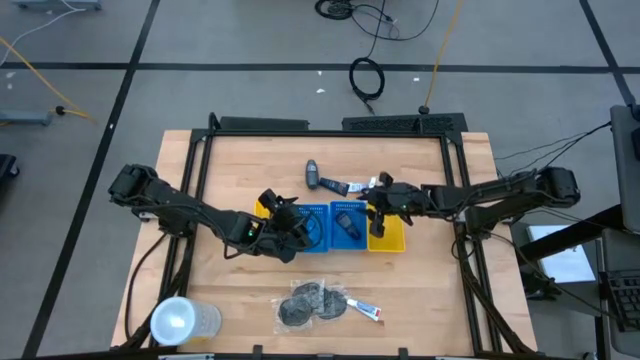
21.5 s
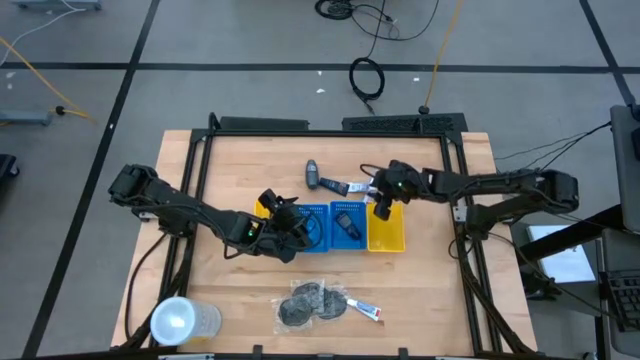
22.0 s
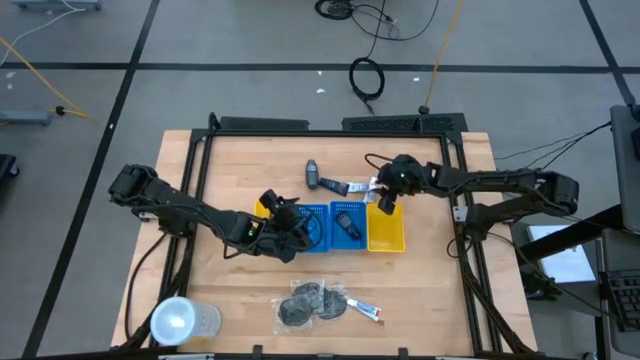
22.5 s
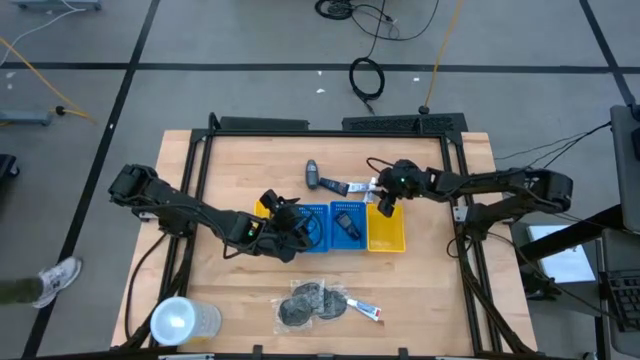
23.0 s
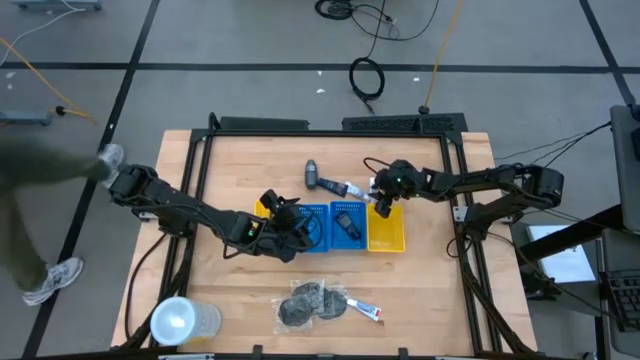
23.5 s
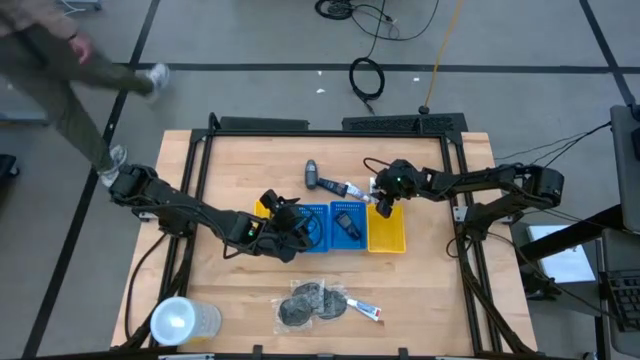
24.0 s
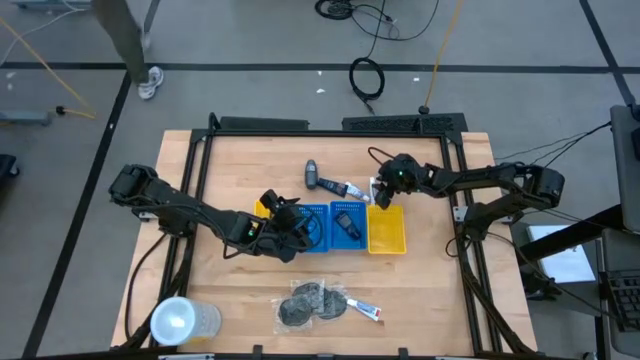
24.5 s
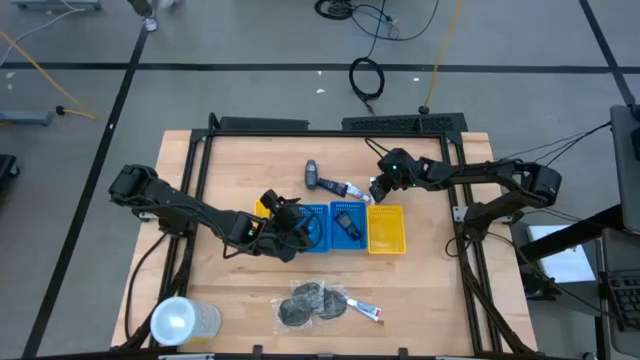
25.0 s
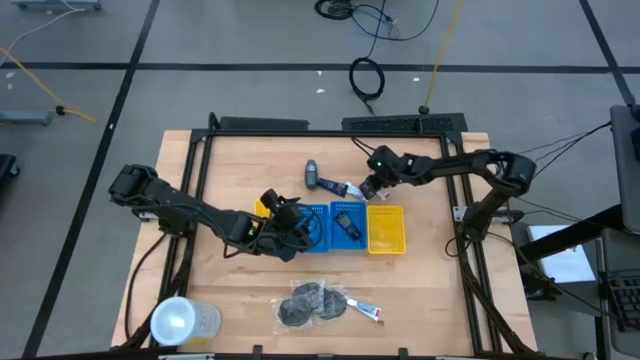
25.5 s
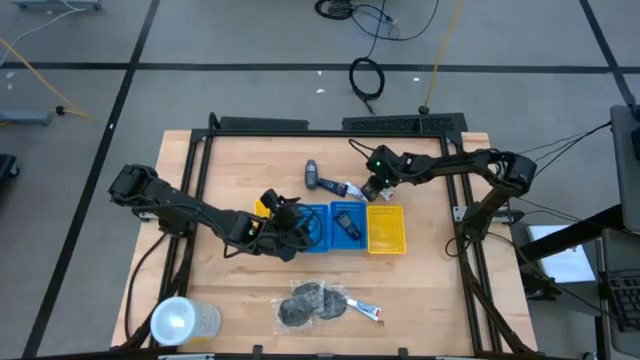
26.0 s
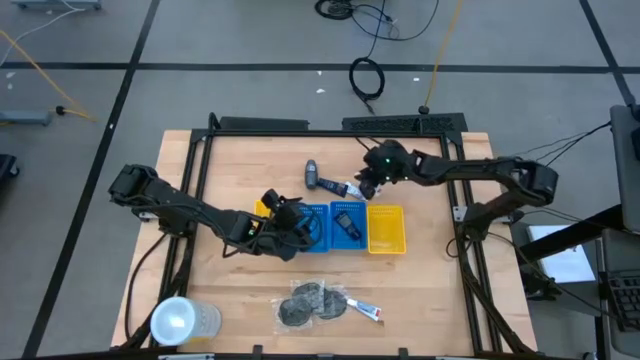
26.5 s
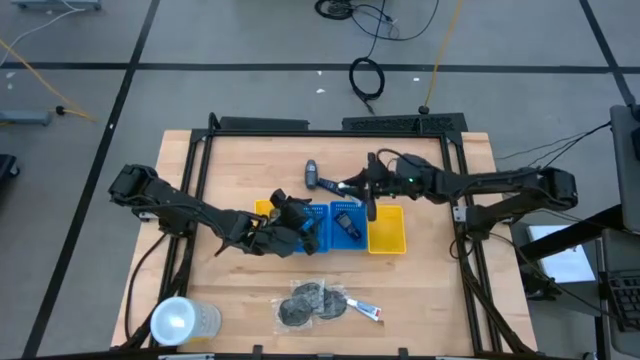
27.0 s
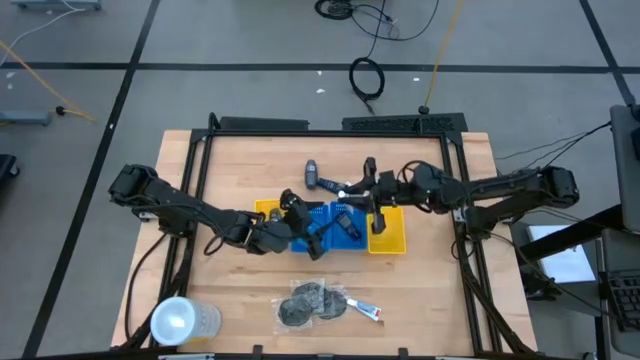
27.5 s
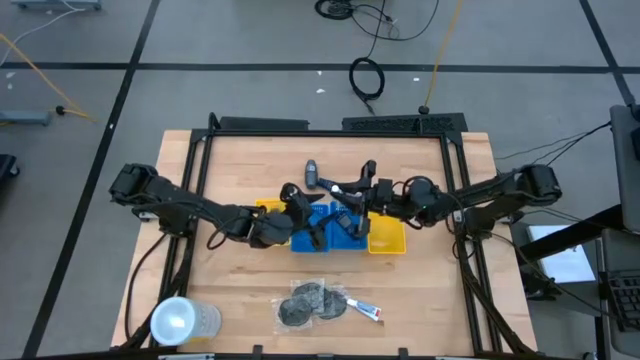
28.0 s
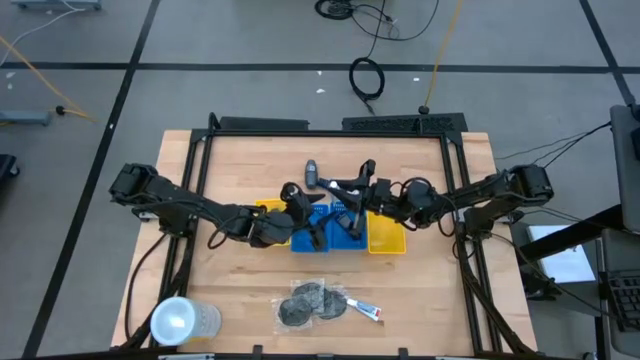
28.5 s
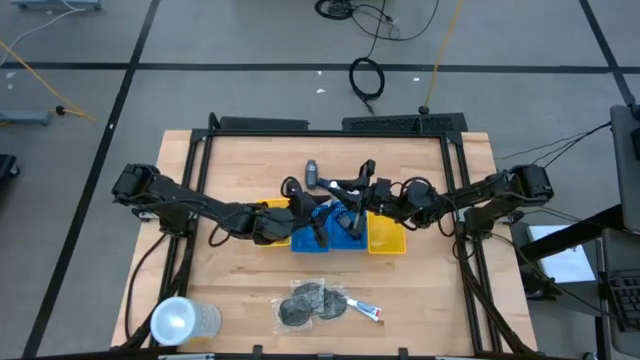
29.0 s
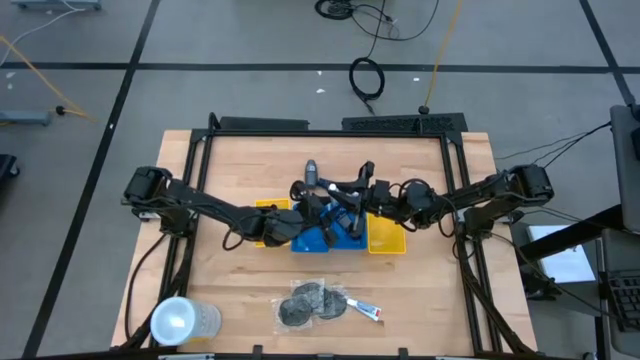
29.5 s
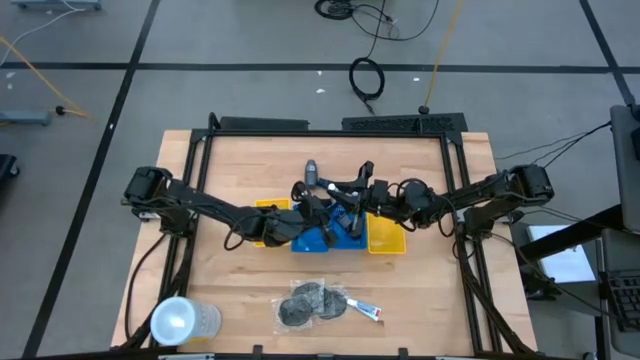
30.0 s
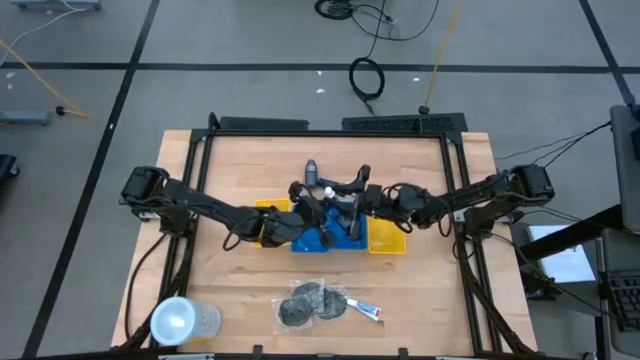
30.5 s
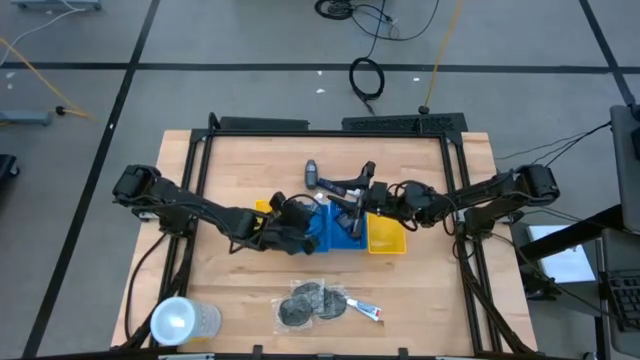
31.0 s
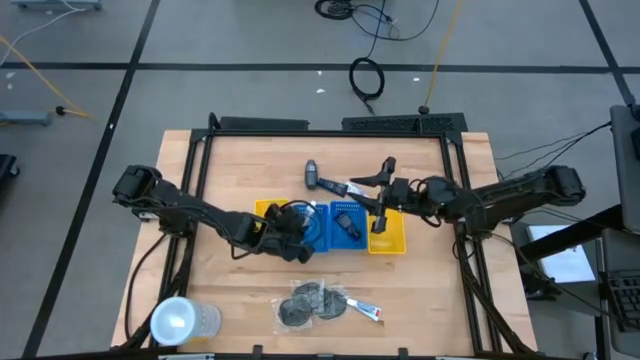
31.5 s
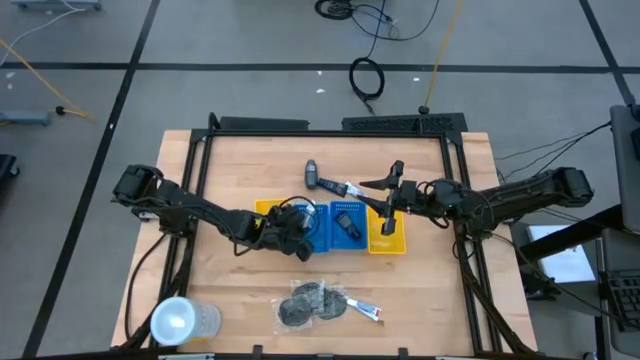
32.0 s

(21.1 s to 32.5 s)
Task: Pick & Place Travel size toiletries
Put the white toothpaste into the left blue basket

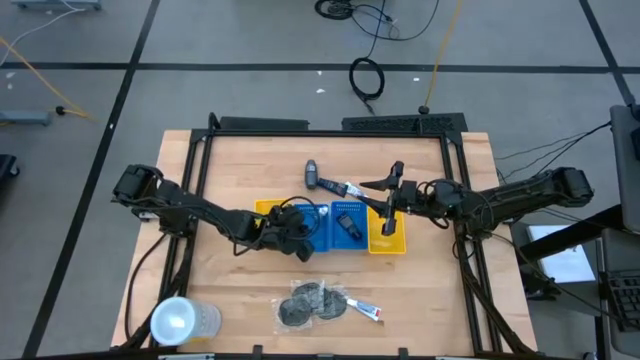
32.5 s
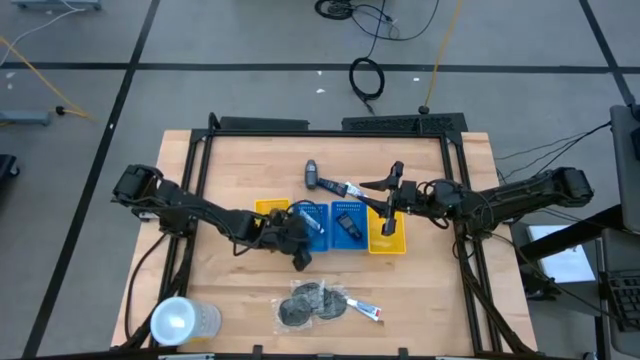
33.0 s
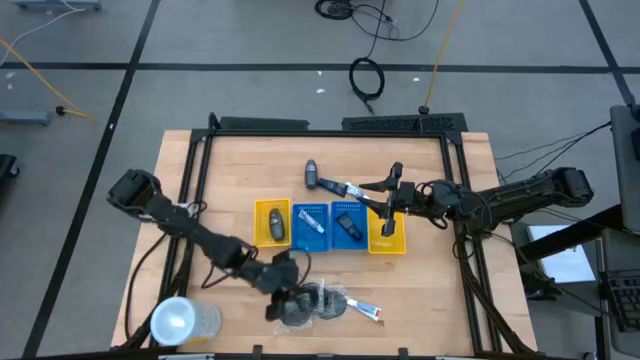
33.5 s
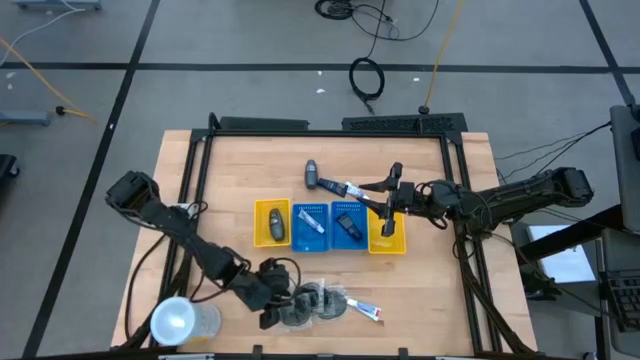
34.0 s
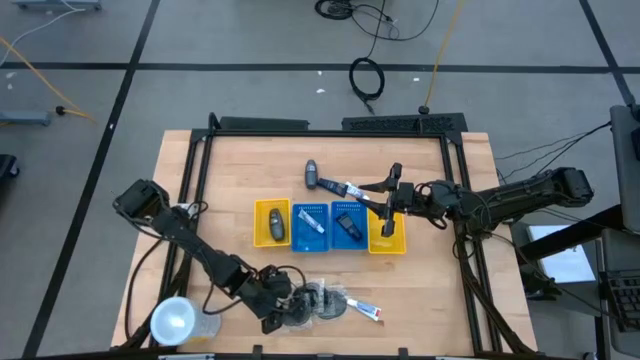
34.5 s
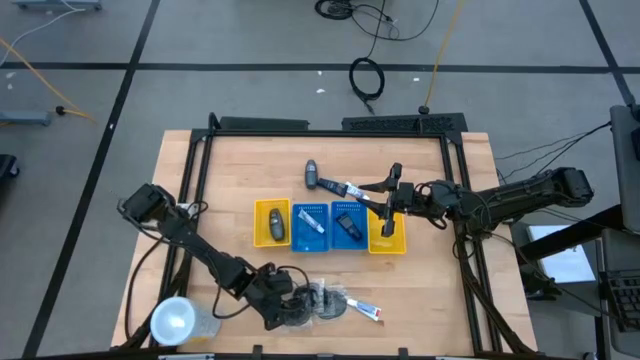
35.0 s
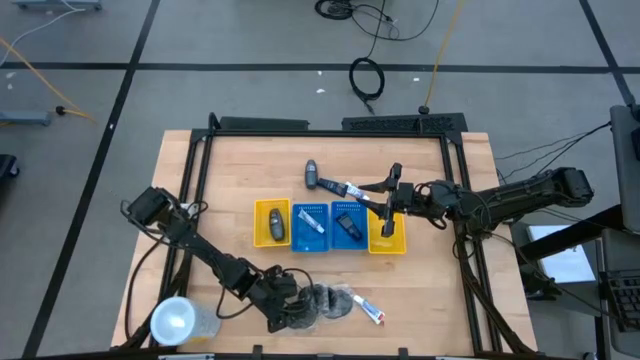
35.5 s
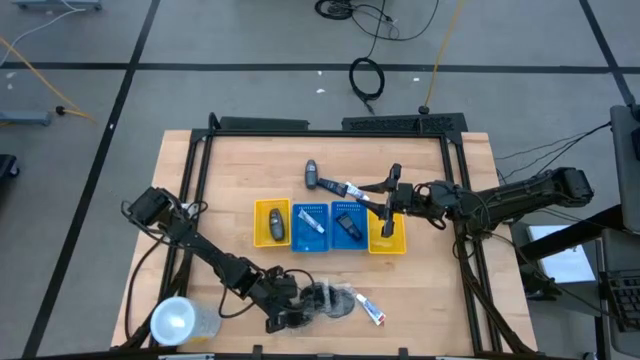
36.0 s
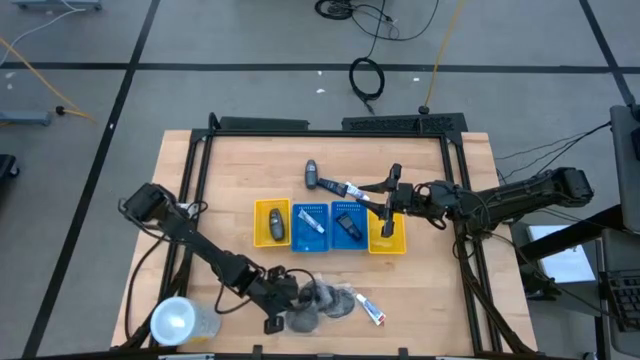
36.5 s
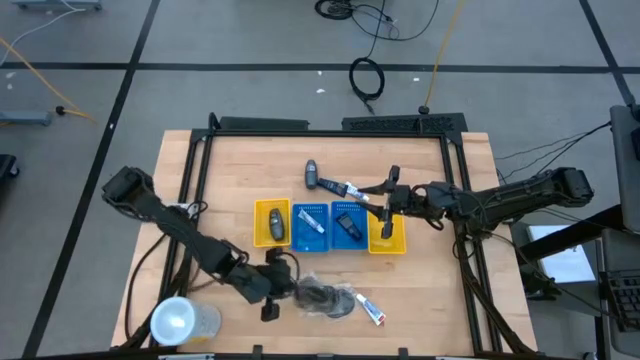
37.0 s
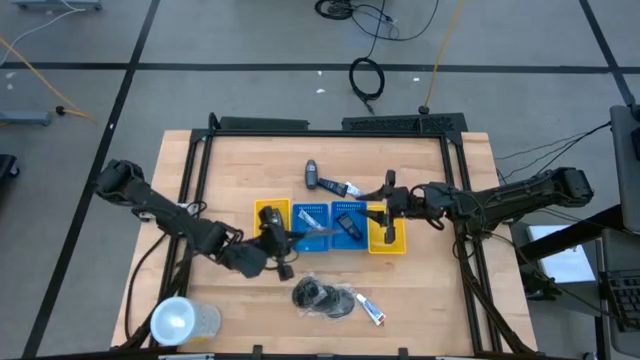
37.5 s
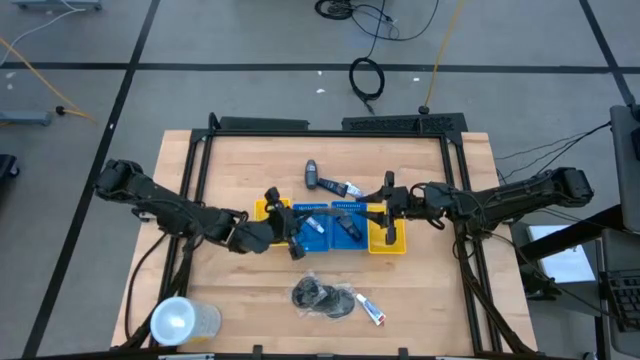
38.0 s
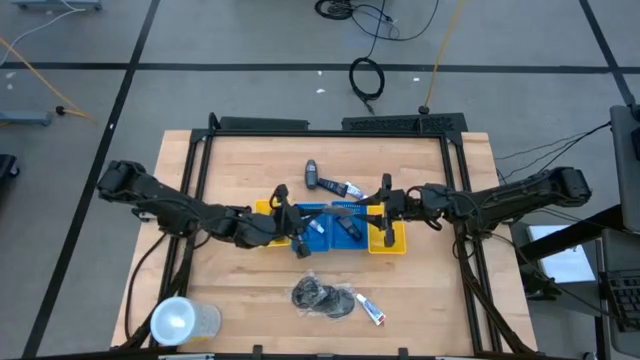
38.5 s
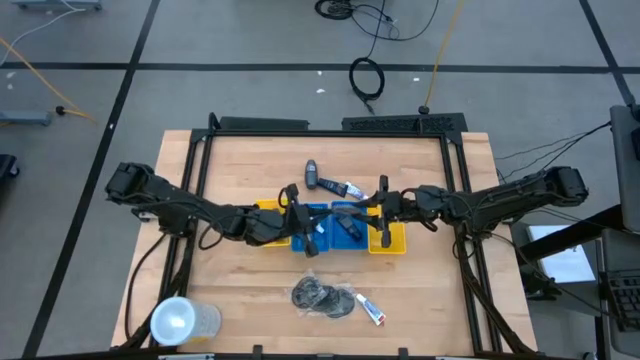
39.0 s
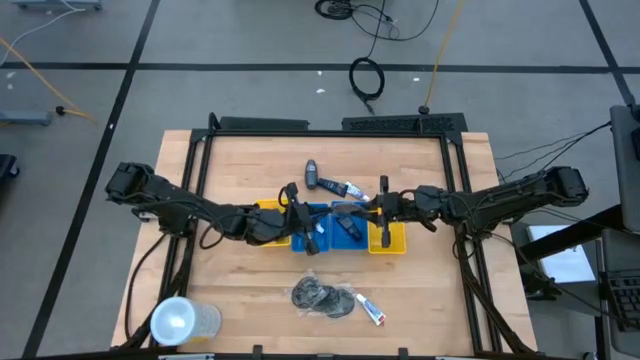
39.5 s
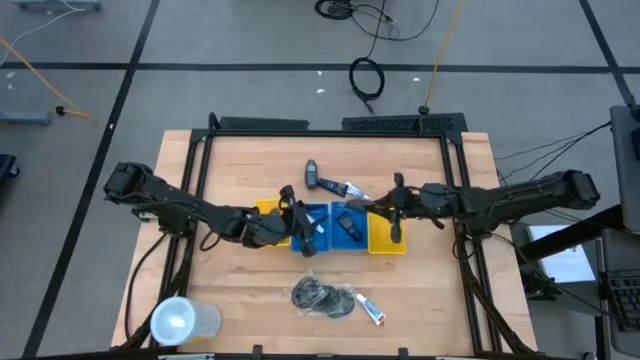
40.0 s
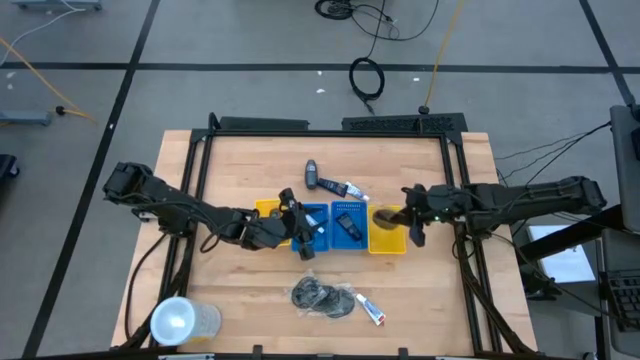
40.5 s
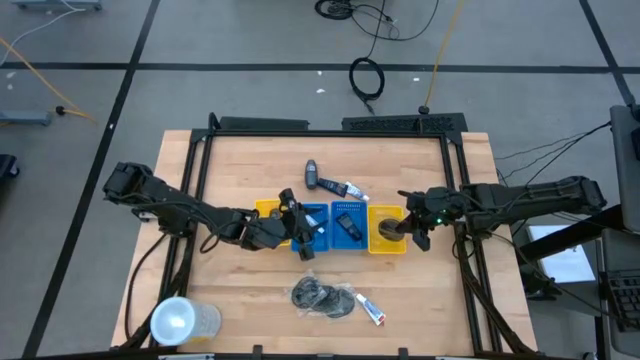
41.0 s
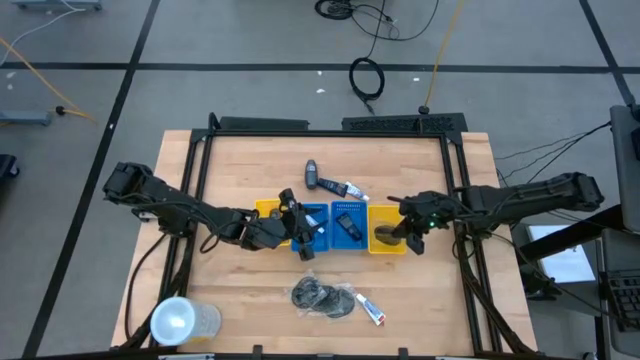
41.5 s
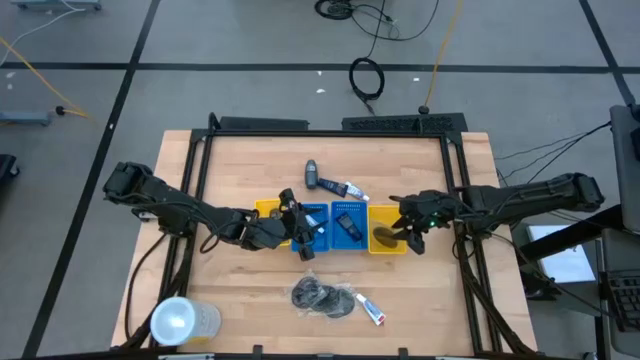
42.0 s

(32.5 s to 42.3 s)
Put the black hairbrush into the right yellow basket

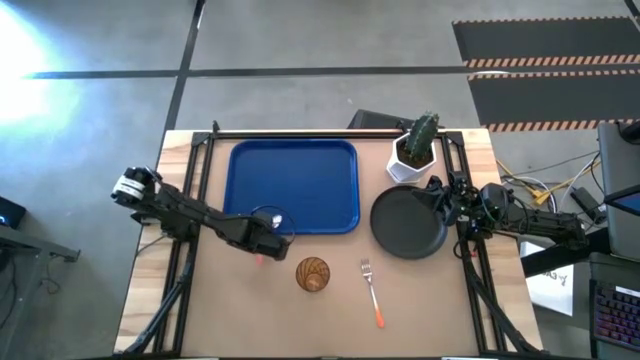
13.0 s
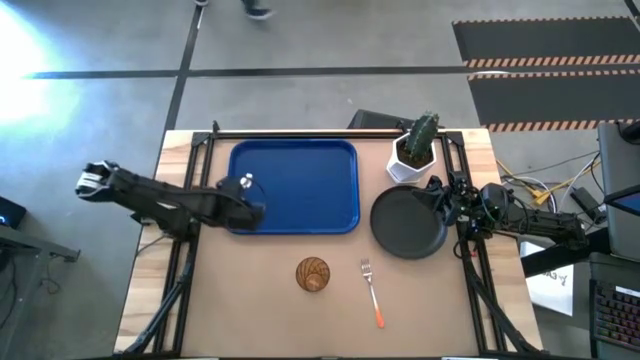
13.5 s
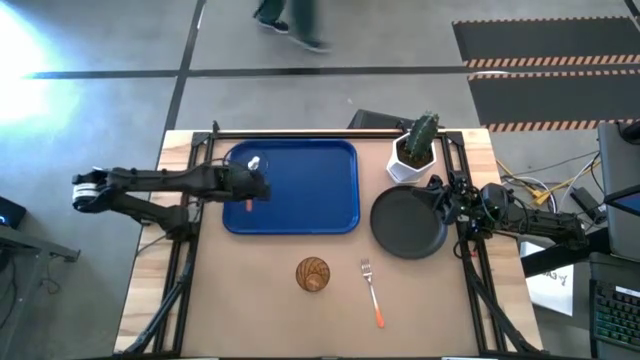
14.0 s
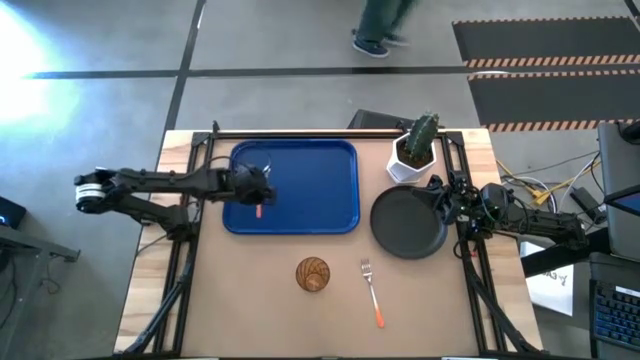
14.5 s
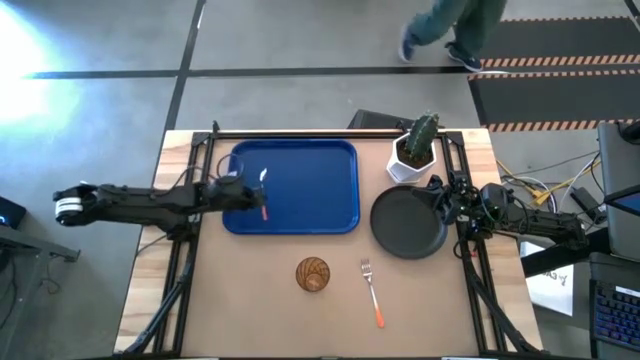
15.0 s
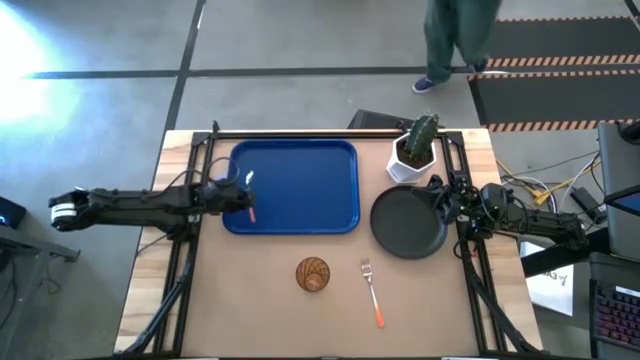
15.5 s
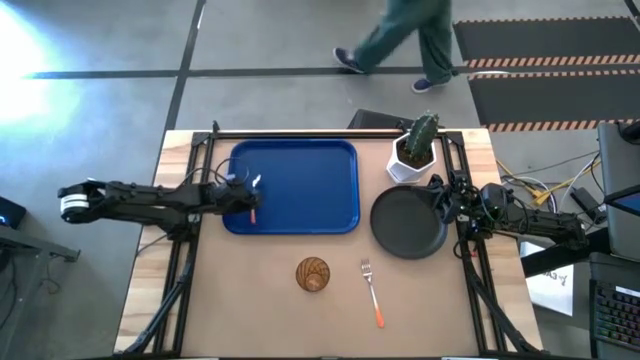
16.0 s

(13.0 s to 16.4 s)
Task: Pick and place plate/cup/fork/spoon on tray
Put the orange spoon on the blue tray
